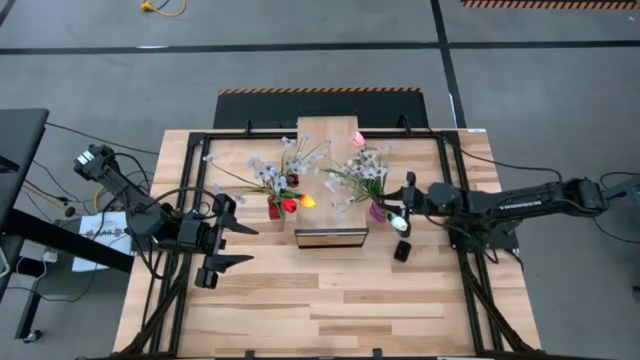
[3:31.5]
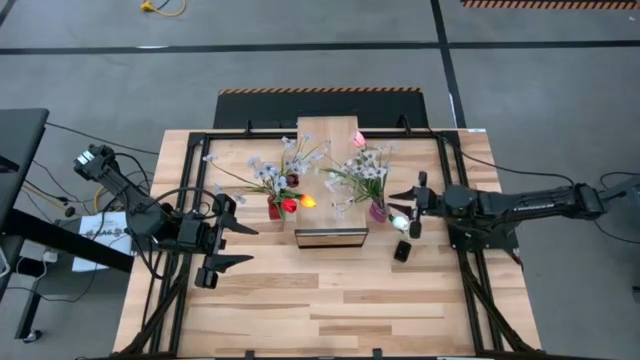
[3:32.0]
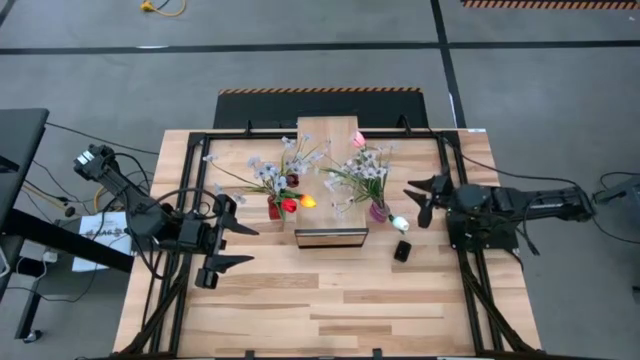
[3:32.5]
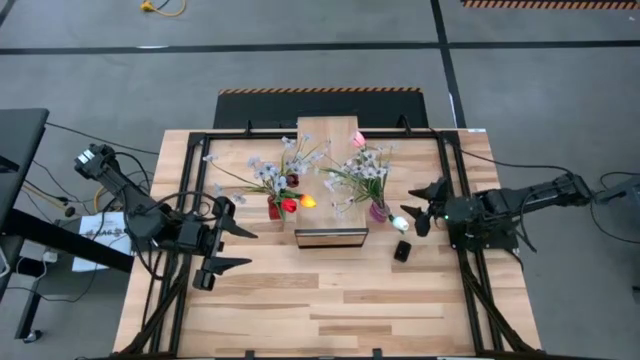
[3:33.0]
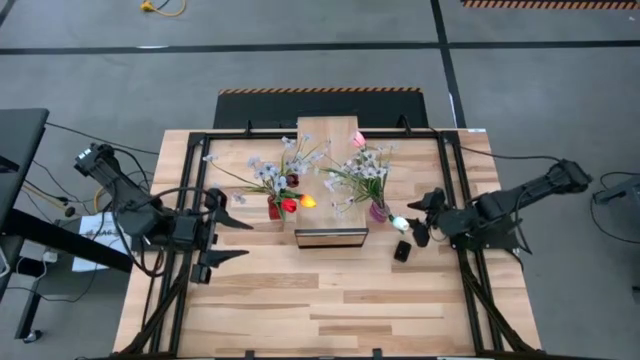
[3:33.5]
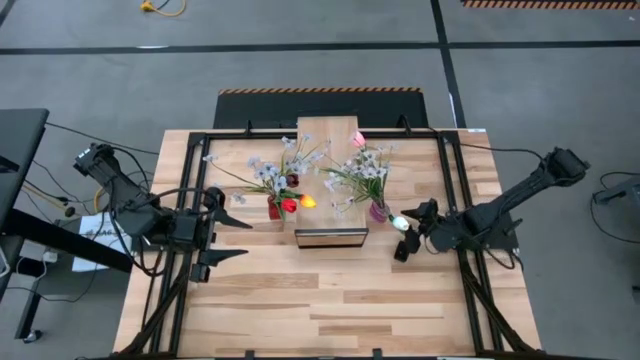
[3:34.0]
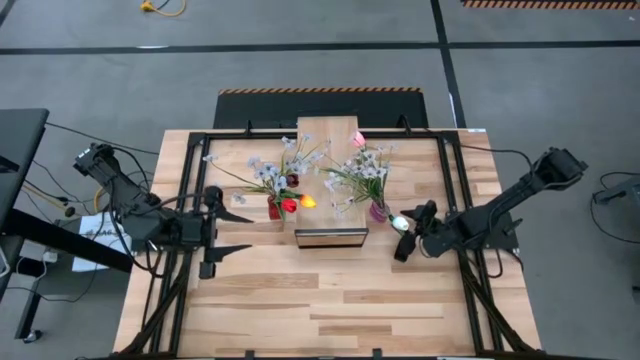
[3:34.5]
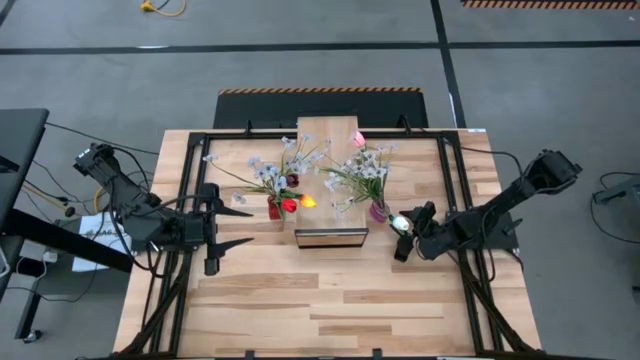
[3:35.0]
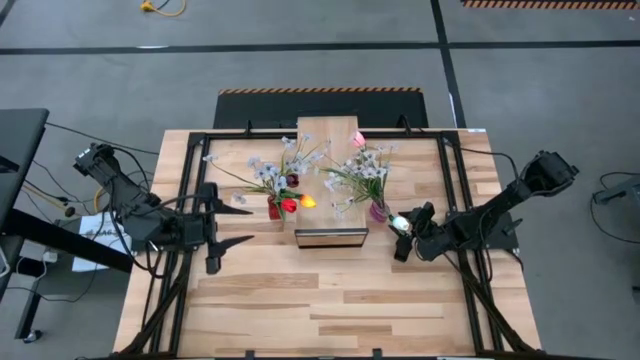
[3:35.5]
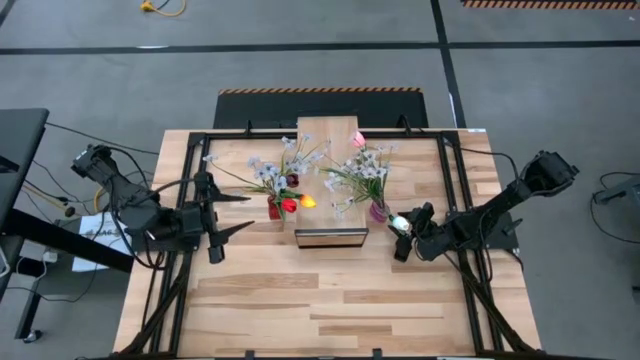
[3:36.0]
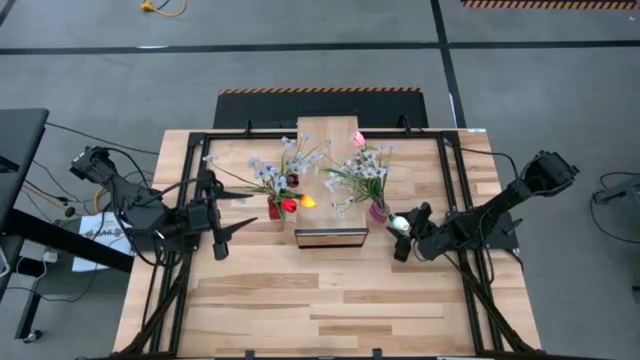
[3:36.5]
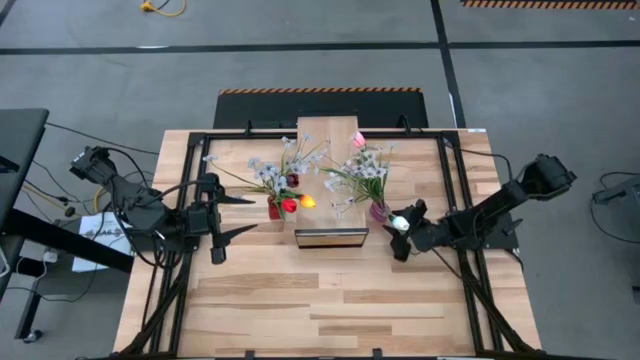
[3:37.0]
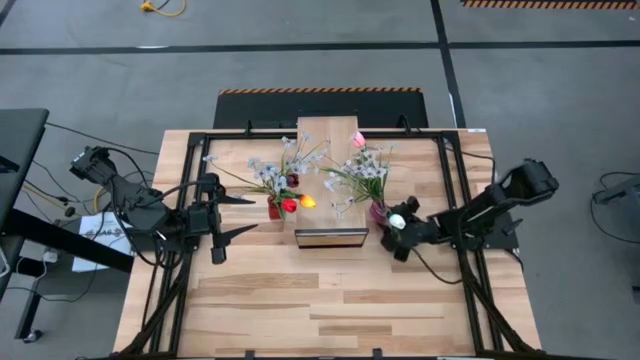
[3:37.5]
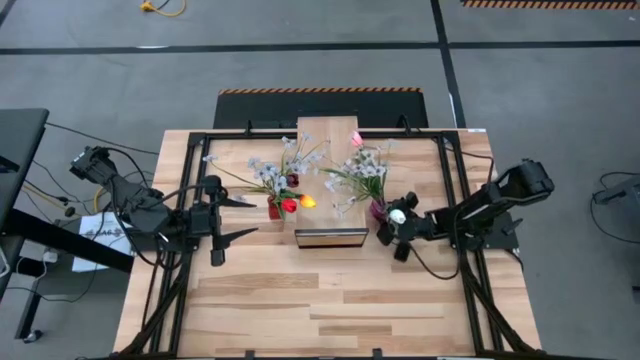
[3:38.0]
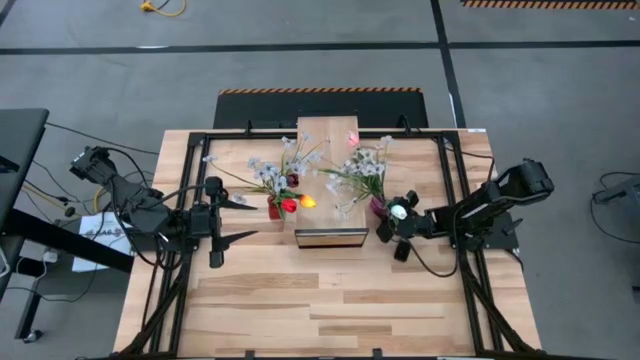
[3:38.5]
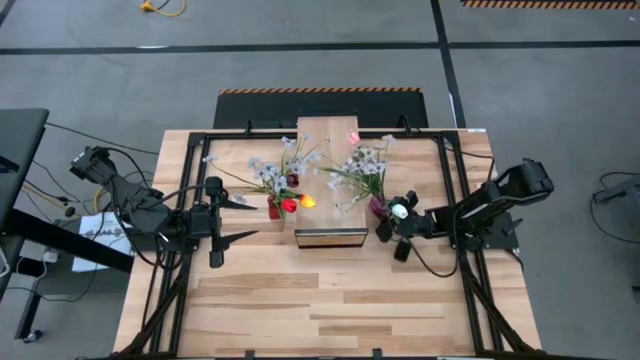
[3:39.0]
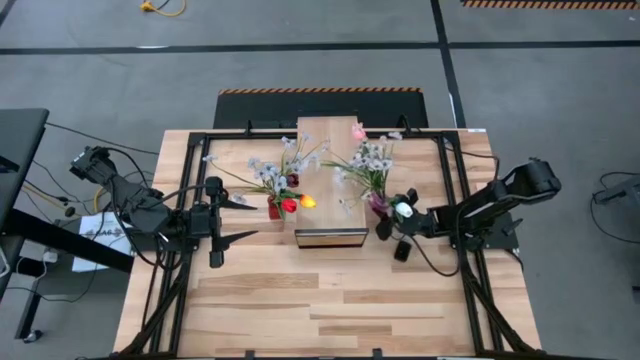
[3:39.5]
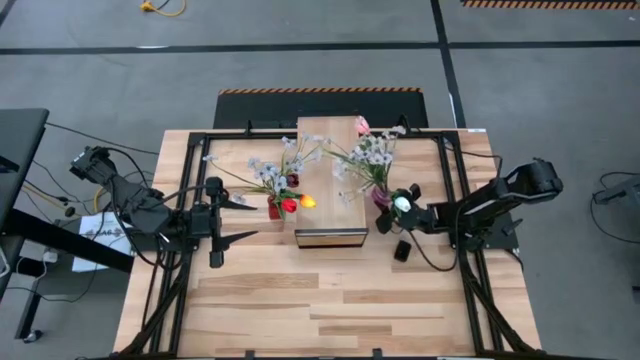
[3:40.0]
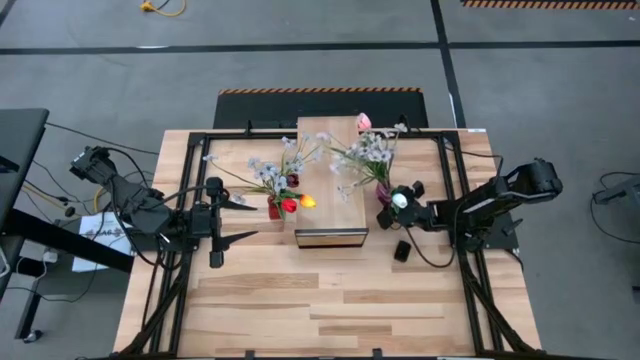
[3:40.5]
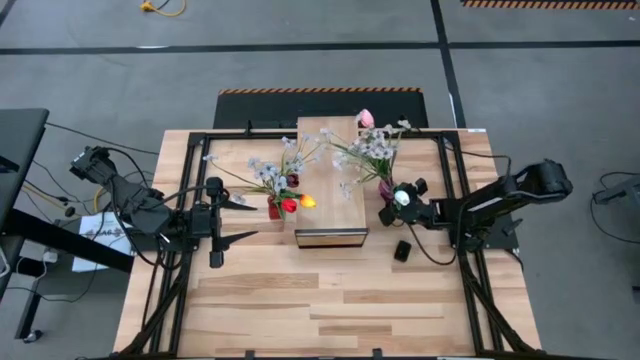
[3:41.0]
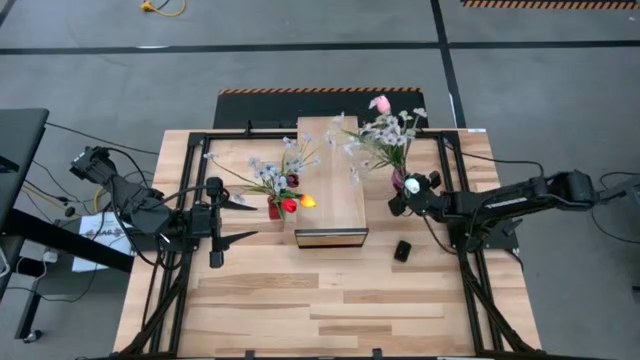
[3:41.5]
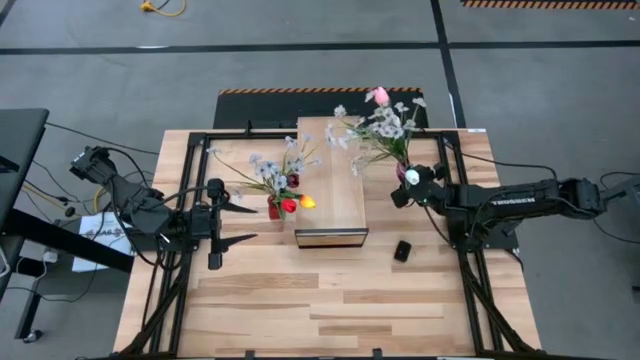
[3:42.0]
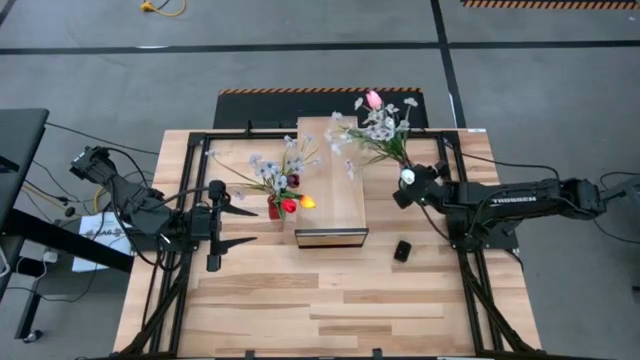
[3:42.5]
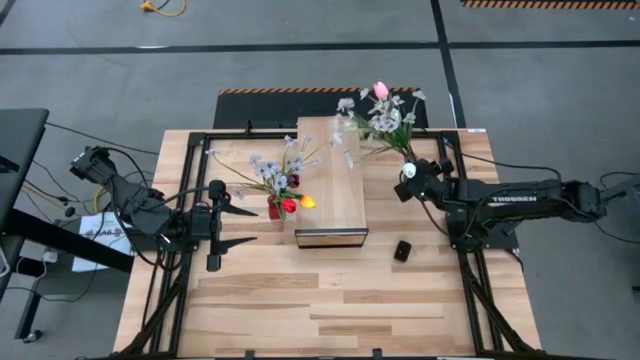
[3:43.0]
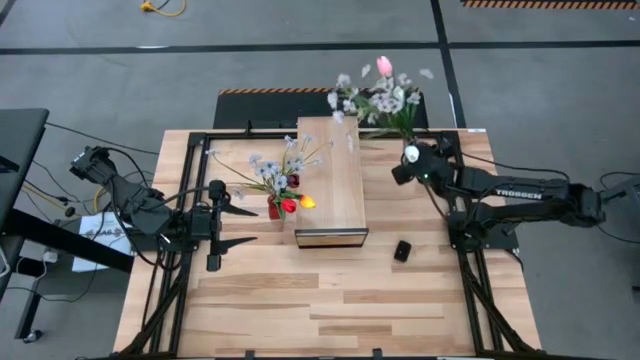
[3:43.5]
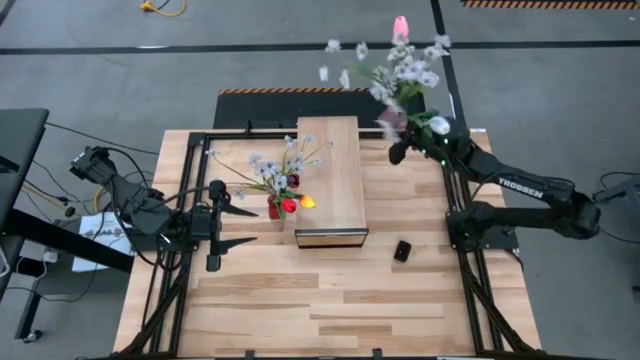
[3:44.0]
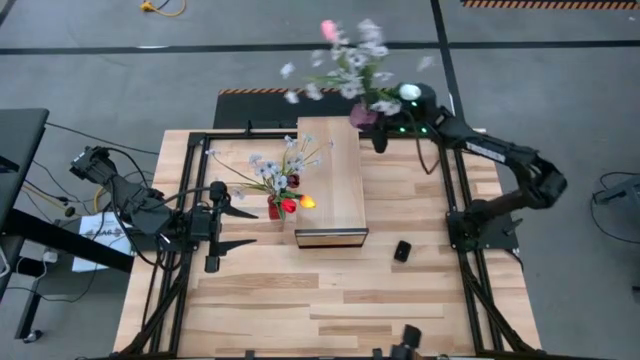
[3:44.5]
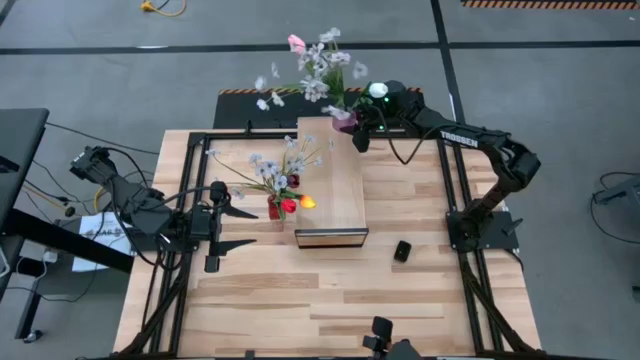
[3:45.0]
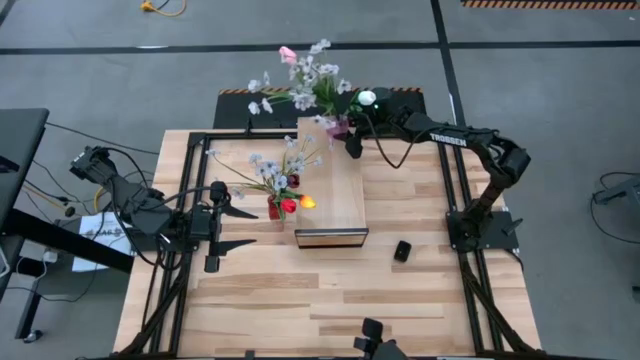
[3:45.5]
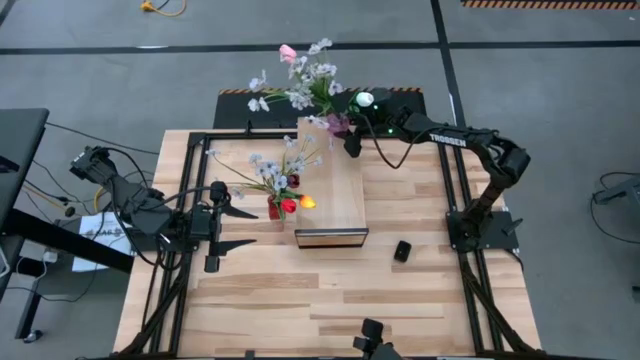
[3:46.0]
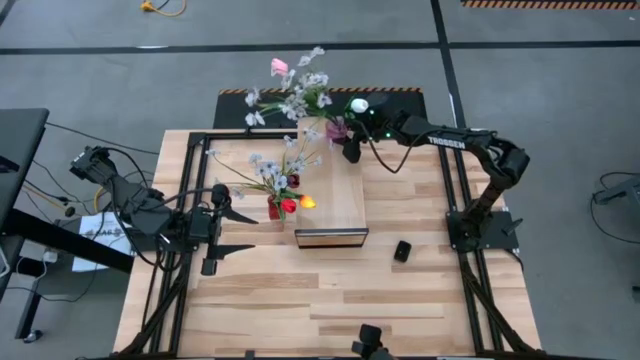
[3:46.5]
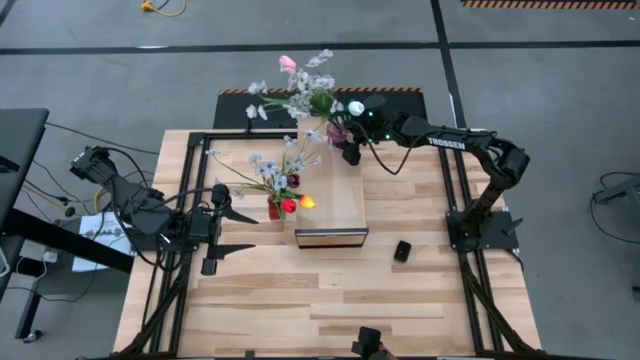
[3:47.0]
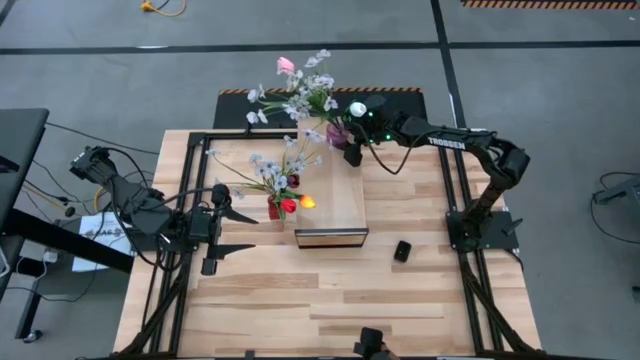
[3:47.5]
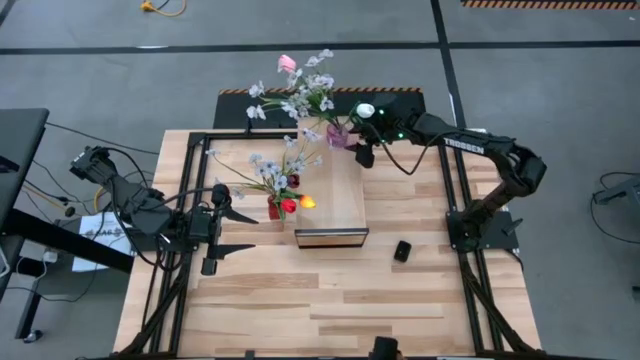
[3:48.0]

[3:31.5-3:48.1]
Task: Pick and place flowers into a vace then onto a shelf
Put the purple flower vase with flowers on the shelf

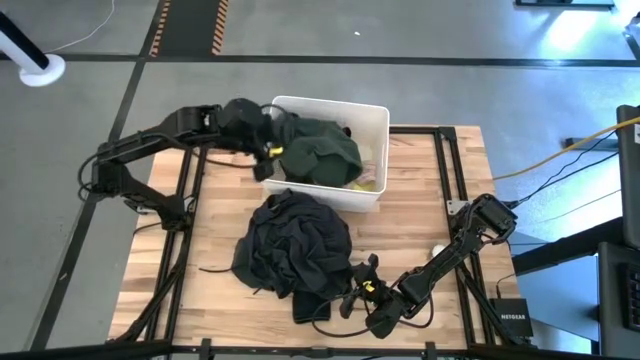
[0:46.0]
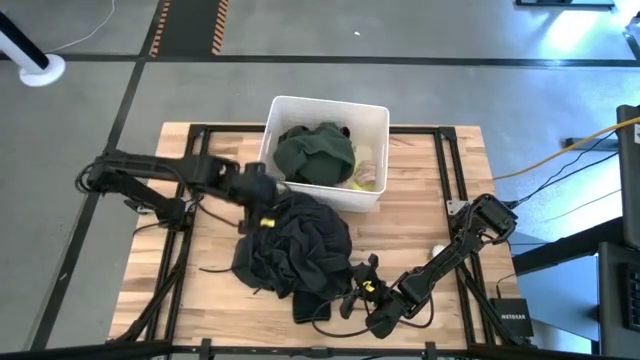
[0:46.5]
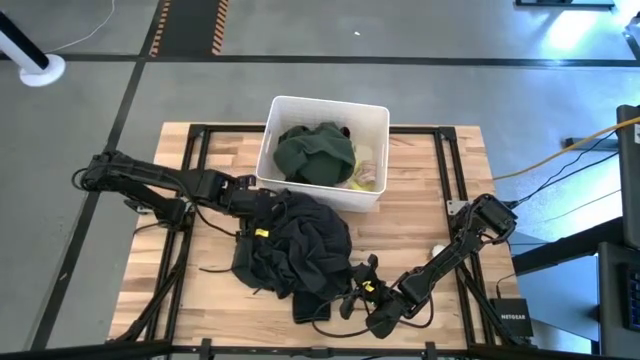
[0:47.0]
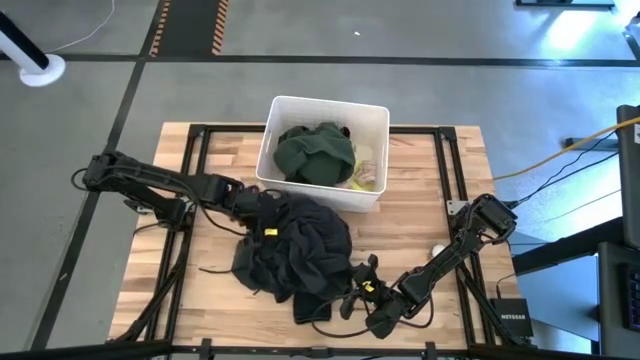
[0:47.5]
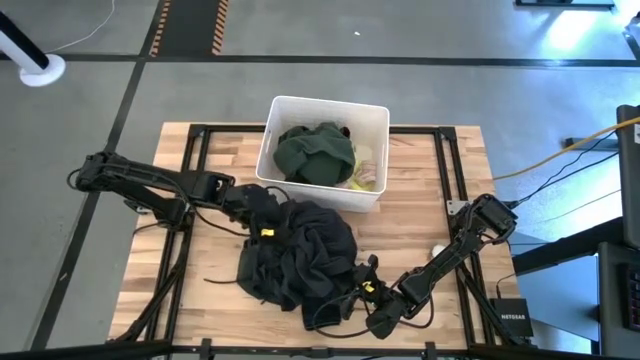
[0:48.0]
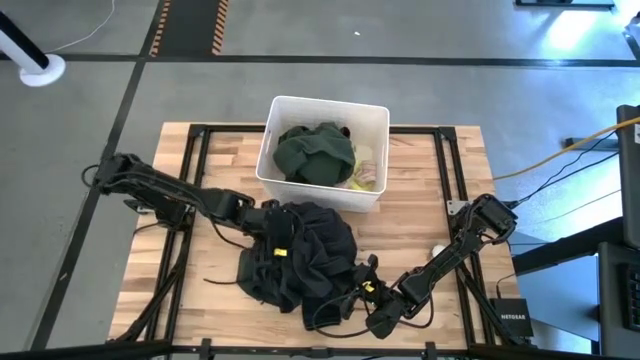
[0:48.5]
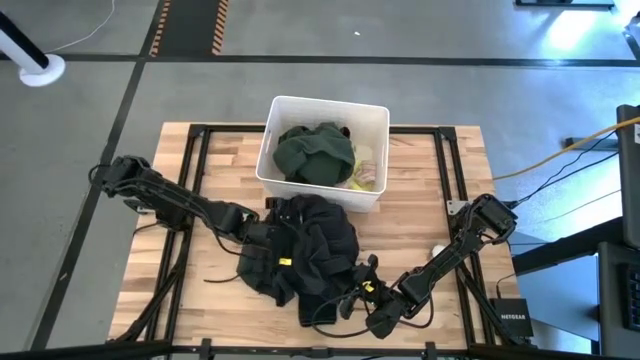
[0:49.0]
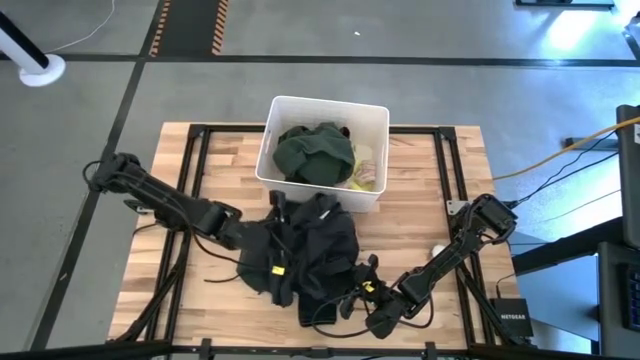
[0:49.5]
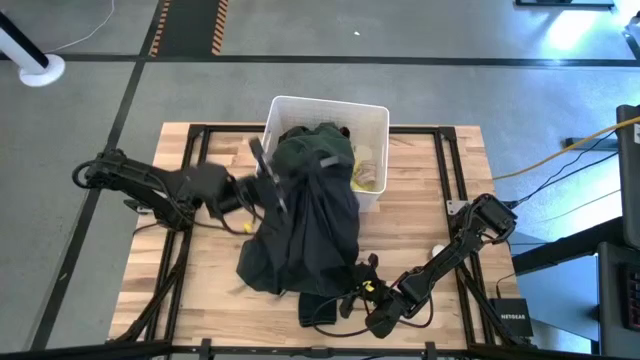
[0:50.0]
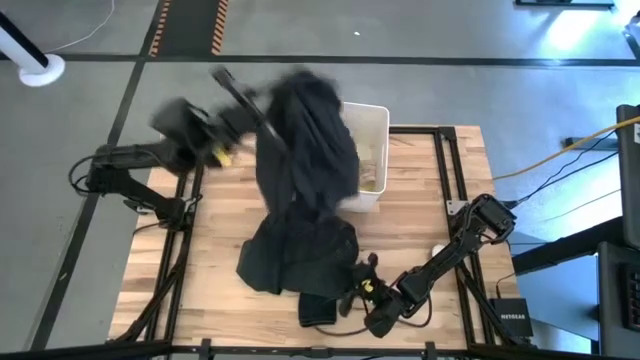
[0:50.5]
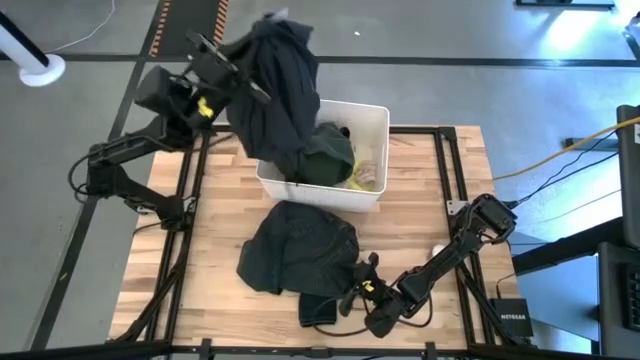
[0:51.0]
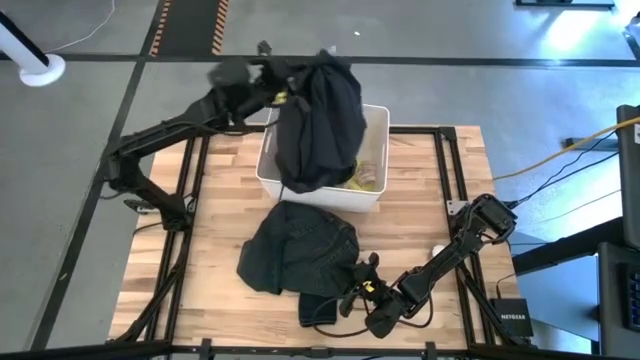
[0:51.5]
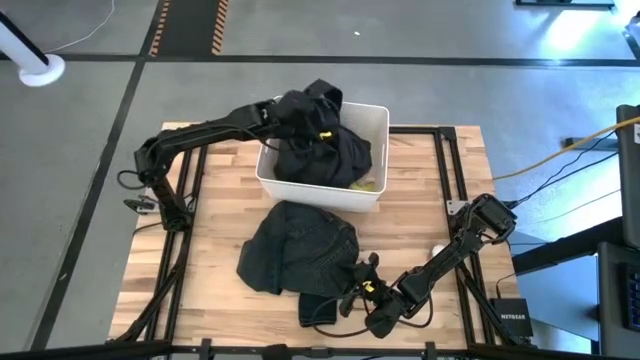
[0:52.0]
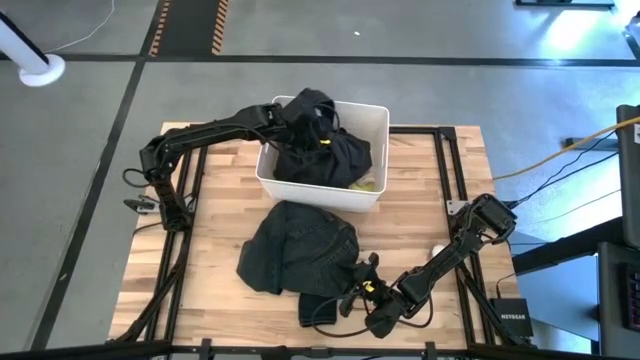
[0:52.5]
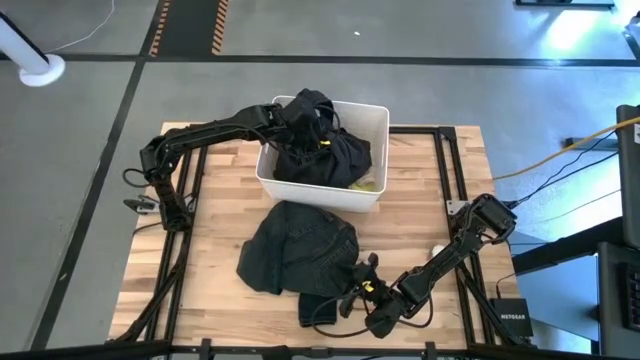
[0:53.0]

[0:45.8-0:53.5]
Task: Sort clothes
Put the black pants into the white bin
